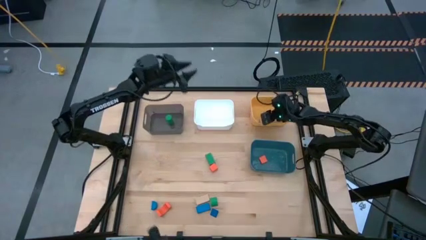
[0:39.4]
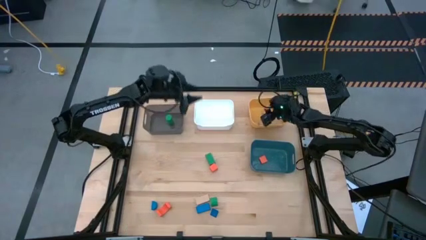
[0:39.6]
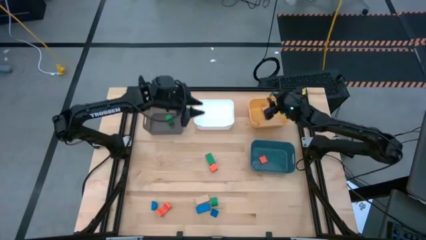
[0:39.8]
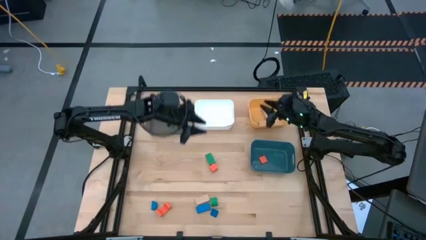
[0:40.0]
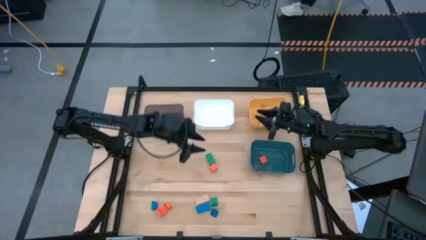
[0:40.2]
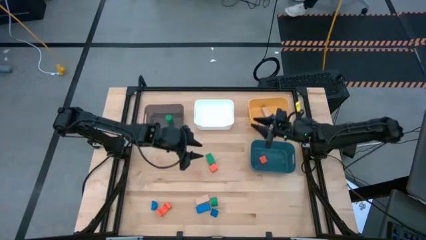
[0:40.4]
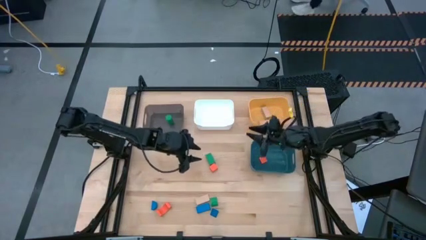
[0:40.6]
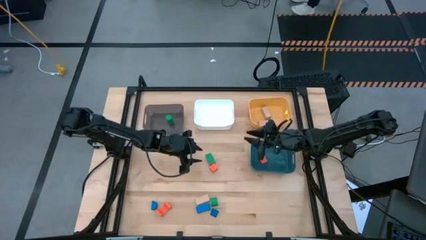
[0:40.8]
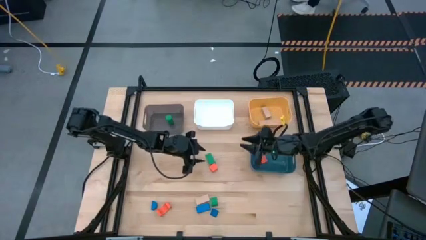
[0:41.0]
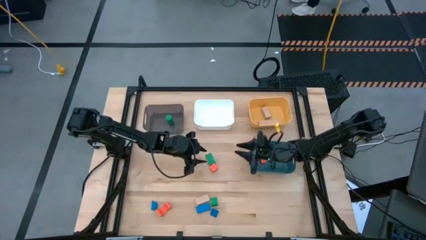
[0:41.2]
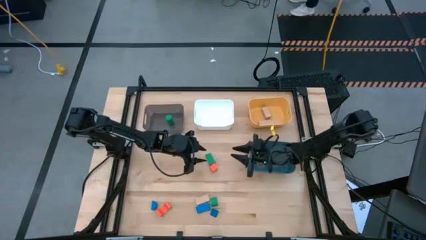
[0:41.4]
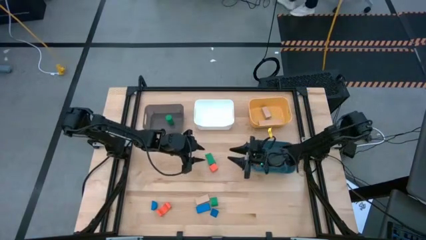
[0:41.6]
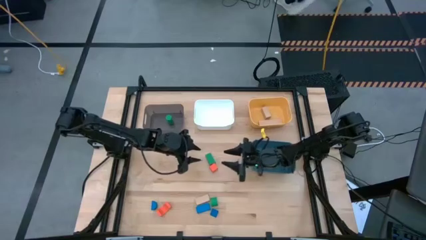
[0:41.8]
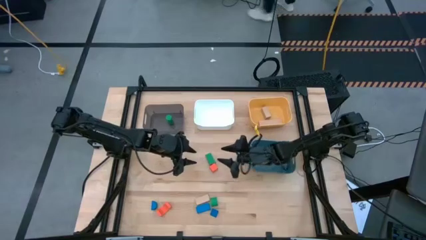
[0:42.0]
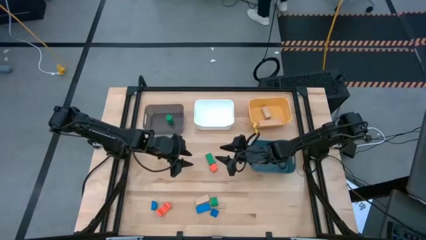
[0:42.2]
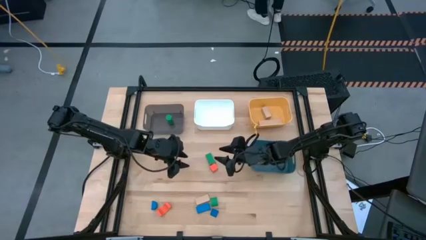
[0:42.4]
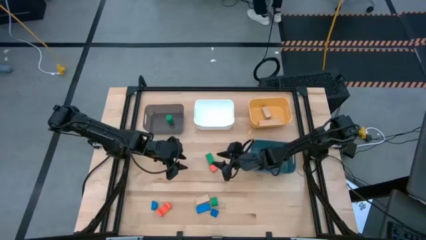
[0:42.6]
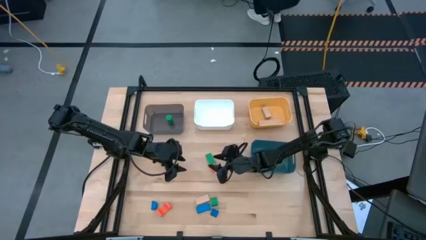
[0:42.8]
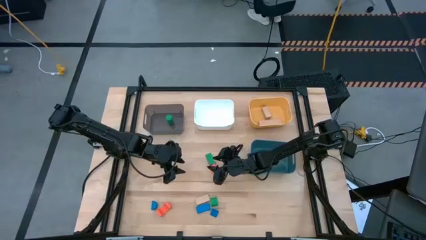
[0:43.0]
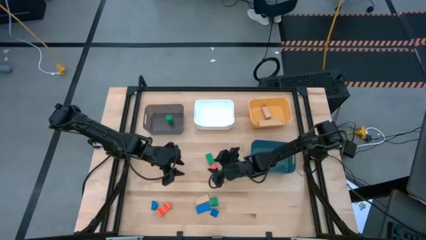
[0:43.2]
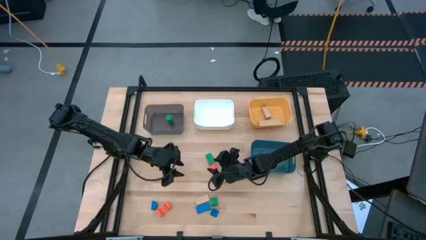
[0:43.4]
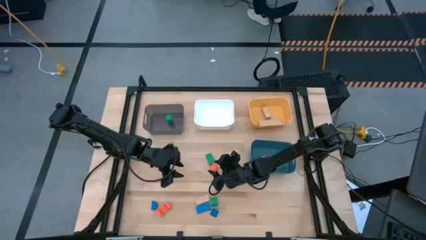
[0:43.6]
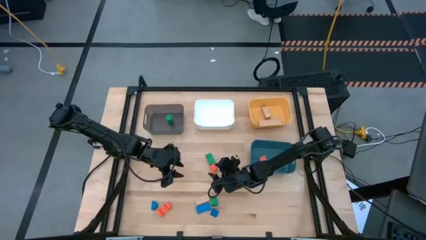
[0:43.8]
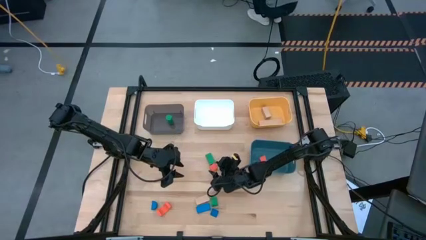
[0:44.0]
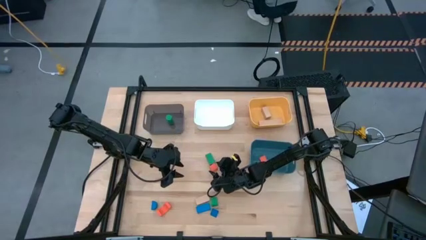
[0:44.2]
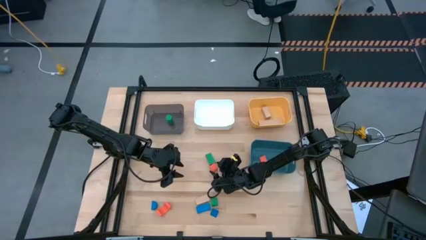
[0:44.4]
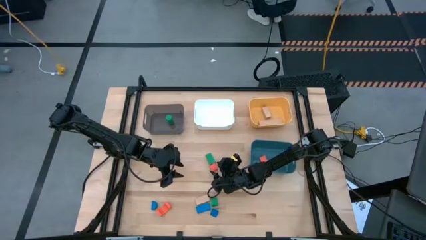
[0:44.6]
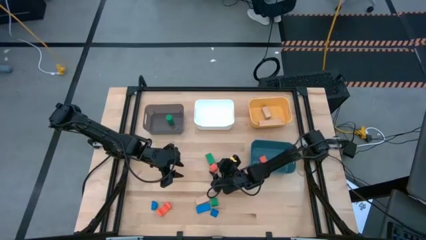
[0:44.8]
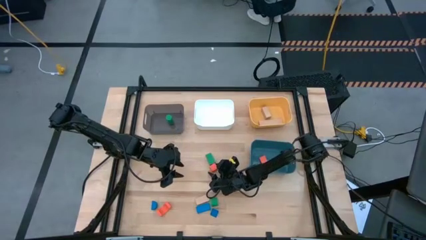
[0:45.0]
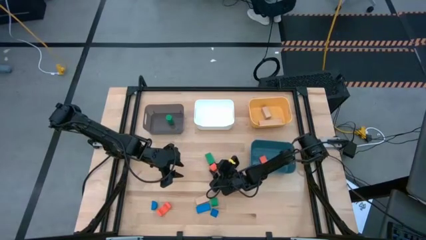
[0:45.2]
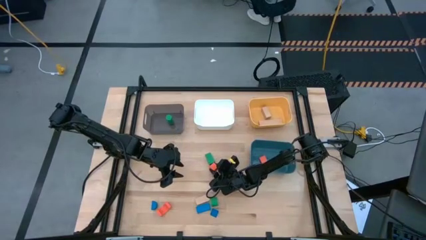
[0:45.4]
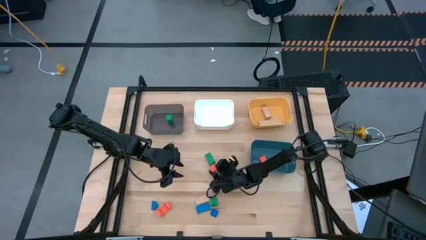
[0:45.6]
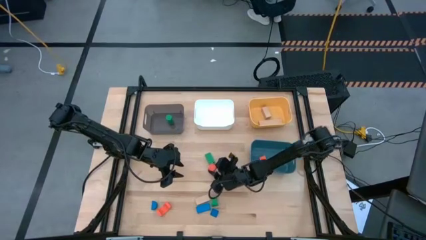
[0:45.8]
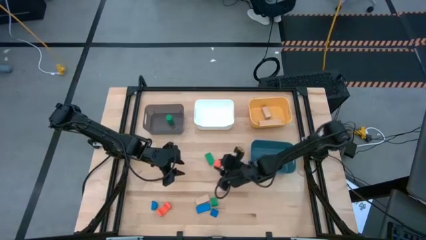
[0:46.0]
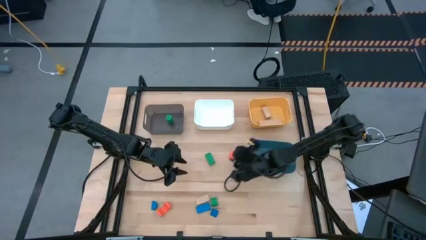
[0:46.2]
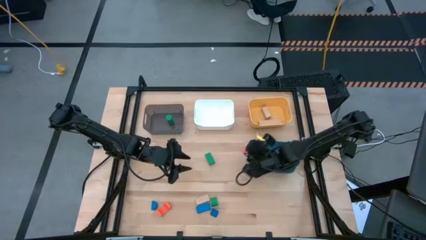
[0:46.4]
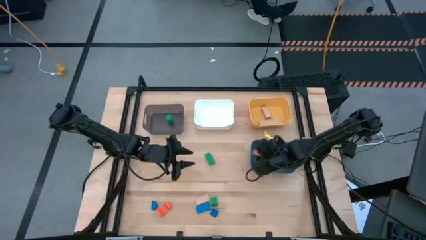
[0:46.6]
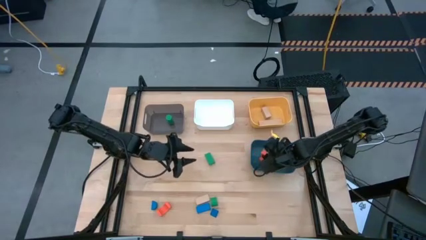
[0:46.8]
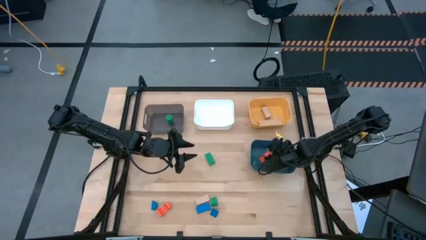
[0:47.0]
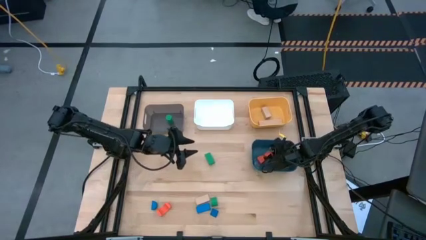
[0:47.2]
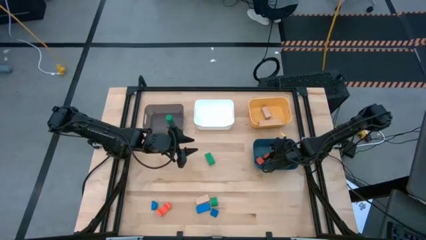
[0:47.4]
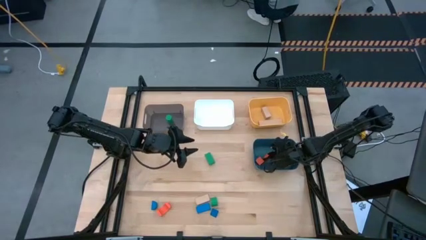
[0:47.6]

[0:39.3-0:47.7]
Task: Sort & place blocks by color
Put the top orange block into the blue bin

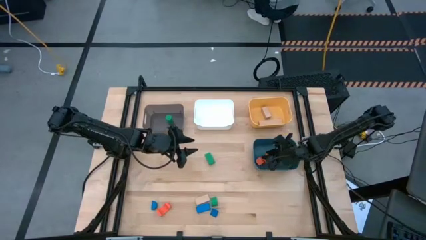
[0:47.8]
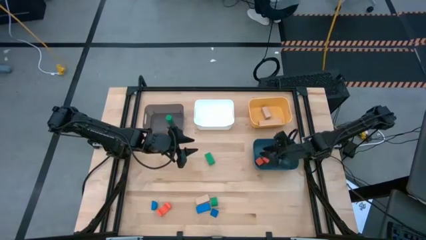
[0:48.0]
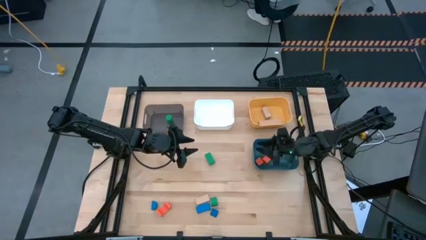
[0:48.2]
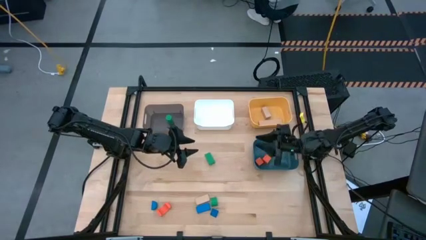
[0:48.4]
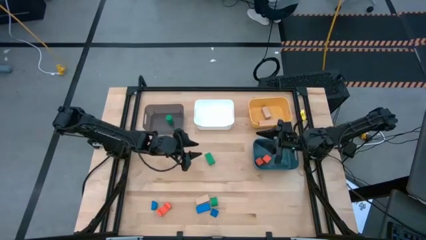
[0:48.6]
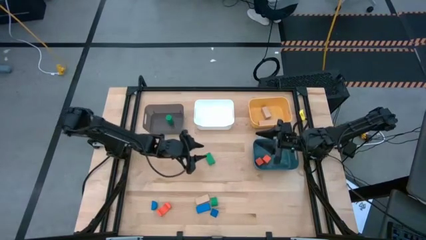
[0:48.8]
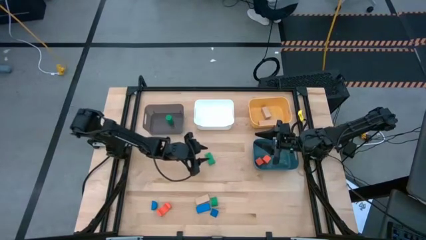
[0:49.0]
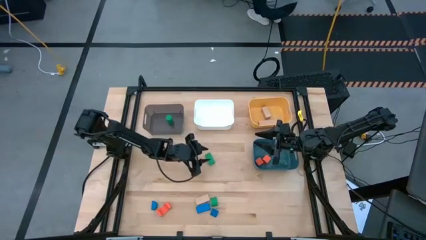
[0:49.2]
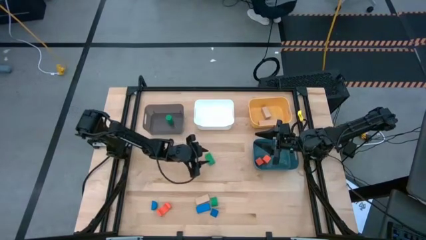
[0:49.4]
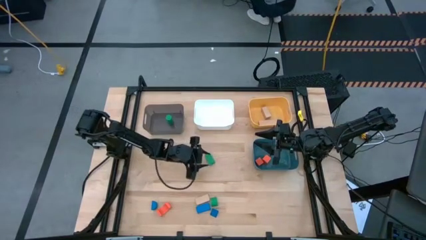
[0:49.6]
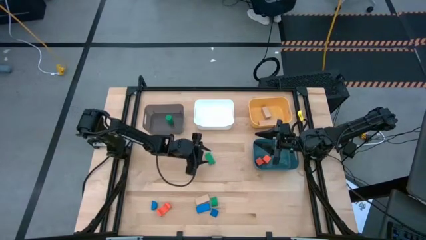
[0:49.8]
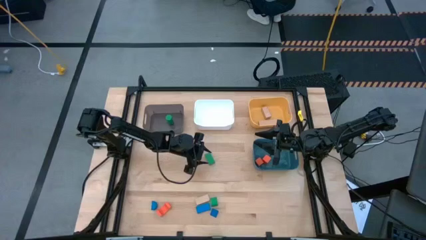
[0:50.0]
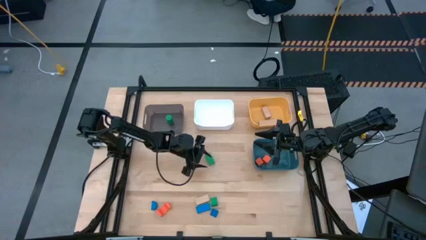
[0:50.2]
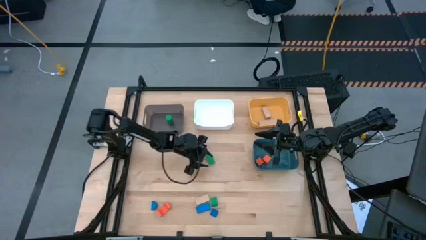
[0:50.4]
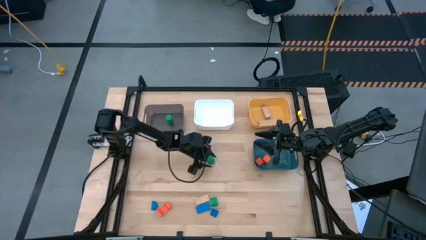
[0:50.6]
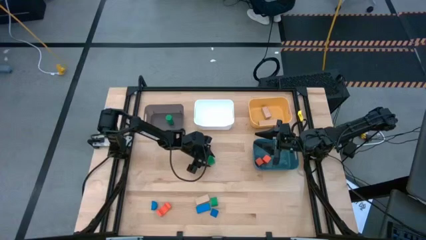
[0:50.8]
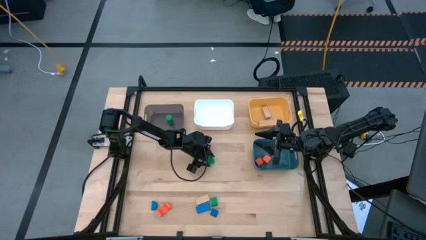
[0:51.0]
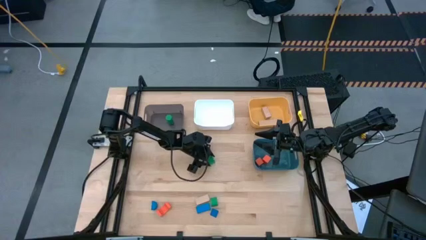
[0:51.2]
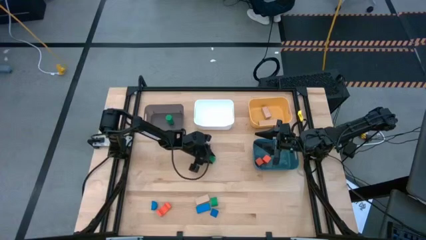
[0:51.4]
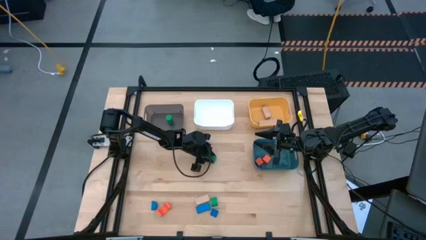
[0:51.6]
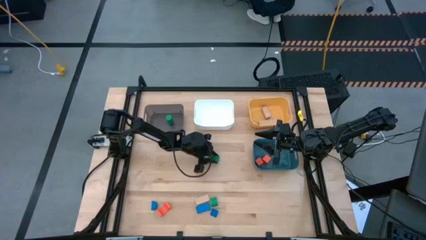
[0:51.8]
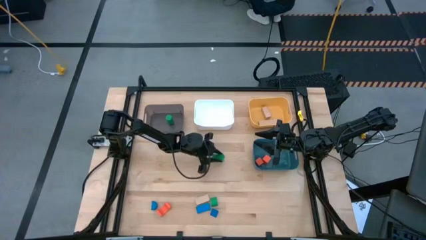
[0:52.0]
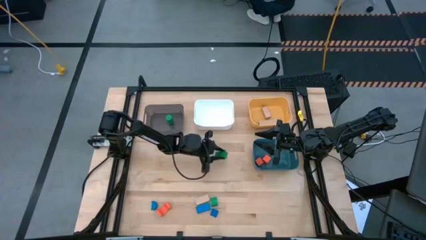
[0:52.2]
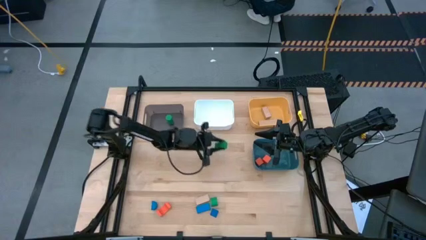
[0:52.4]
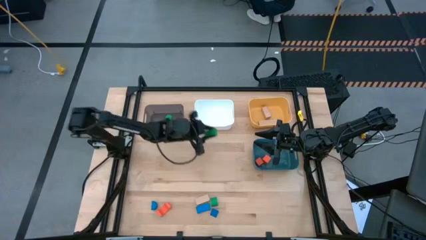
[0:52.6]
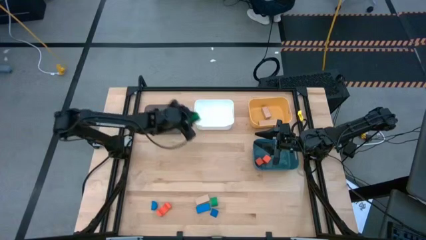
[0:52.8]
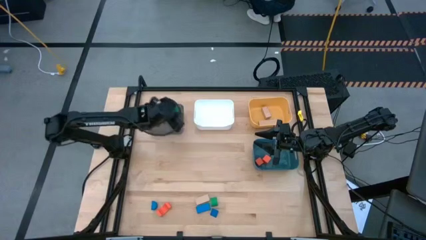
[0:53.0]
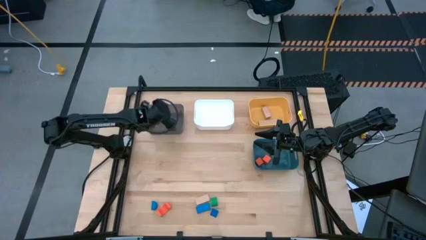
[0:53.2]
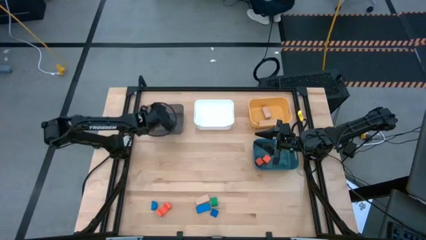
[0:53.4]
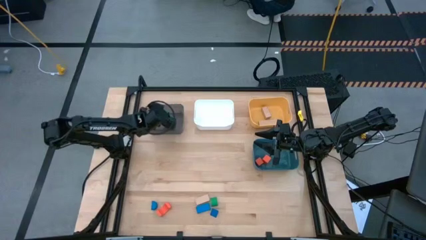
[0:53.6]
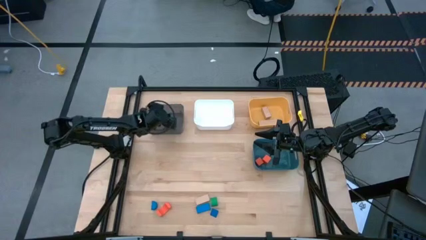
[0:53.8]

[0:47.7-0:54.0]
Put the top green block into the black bin
